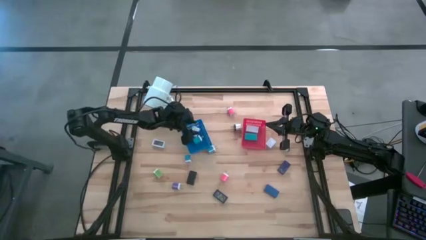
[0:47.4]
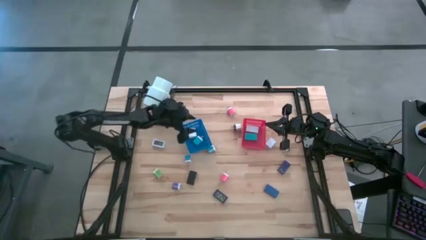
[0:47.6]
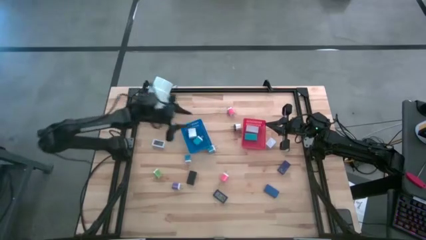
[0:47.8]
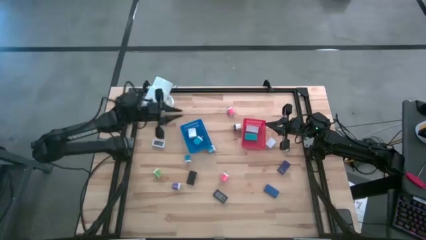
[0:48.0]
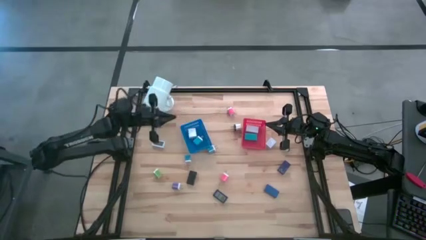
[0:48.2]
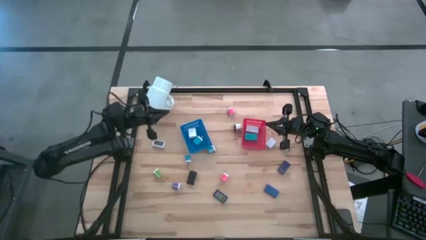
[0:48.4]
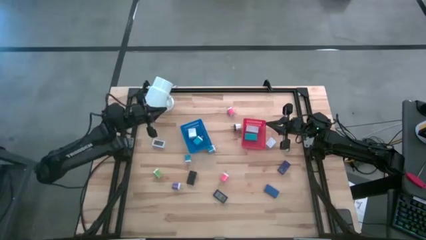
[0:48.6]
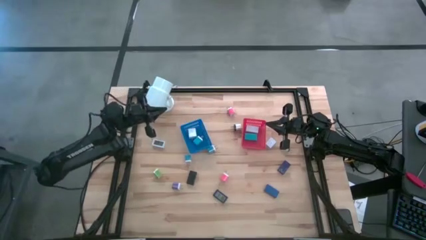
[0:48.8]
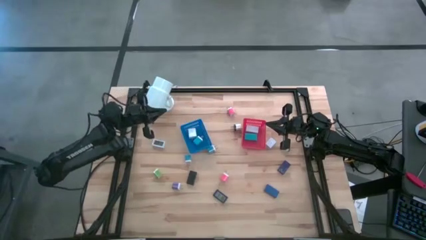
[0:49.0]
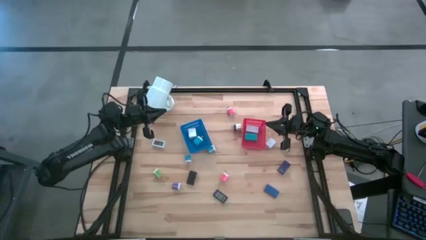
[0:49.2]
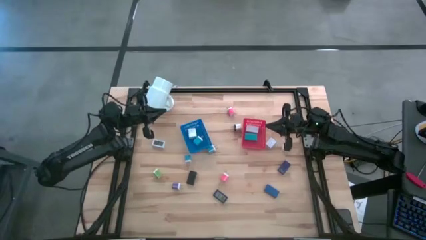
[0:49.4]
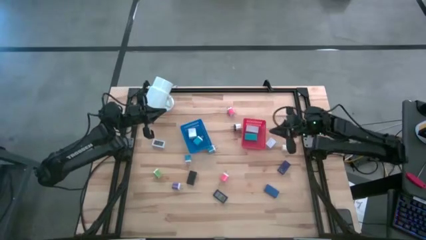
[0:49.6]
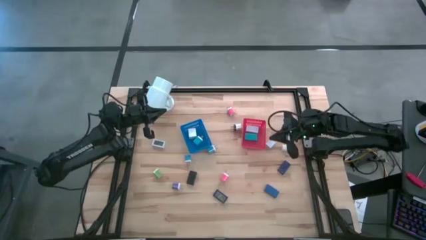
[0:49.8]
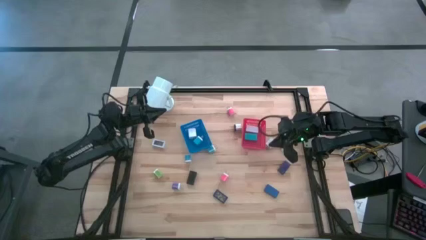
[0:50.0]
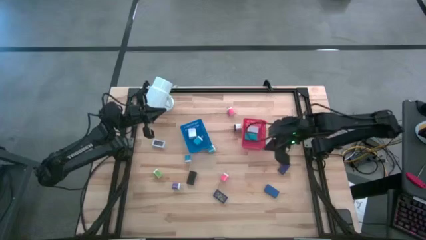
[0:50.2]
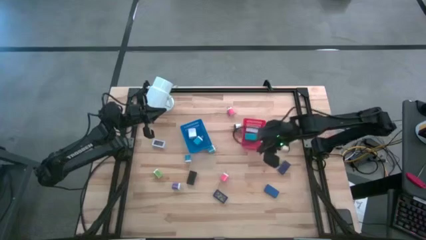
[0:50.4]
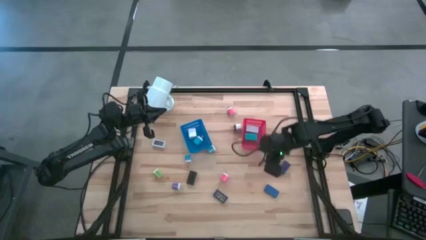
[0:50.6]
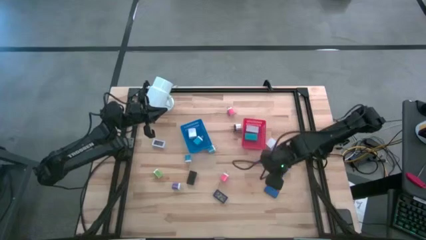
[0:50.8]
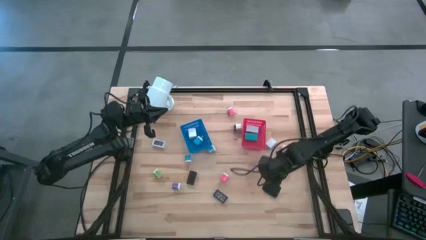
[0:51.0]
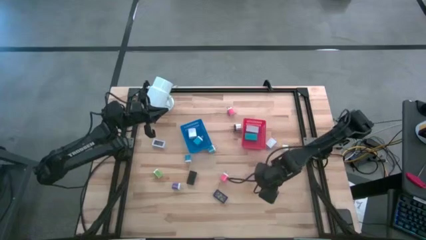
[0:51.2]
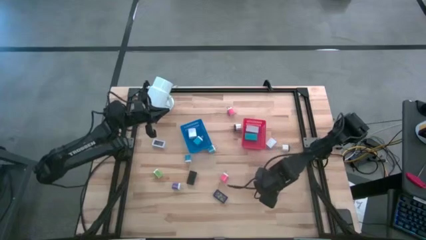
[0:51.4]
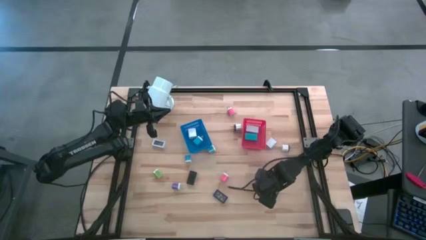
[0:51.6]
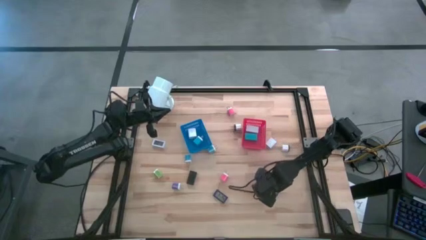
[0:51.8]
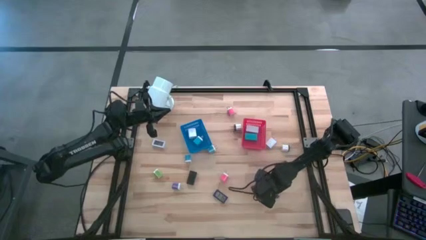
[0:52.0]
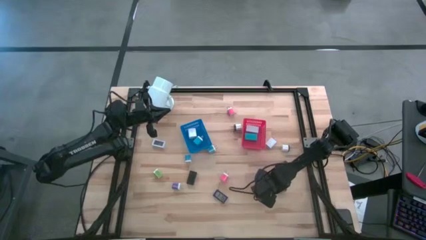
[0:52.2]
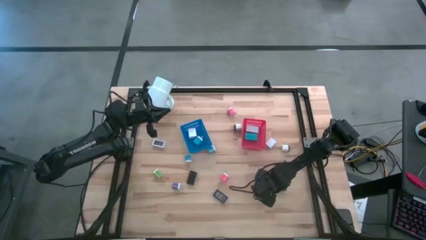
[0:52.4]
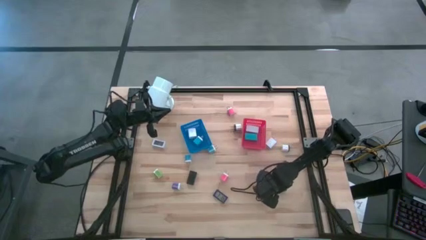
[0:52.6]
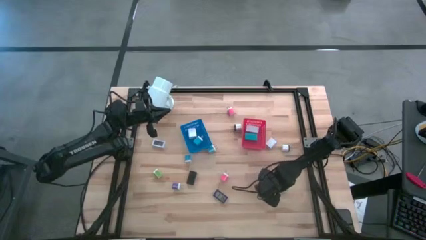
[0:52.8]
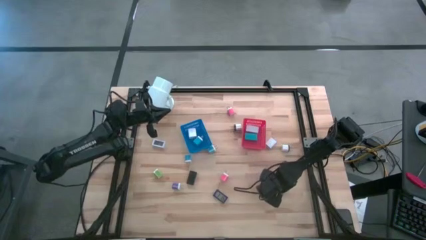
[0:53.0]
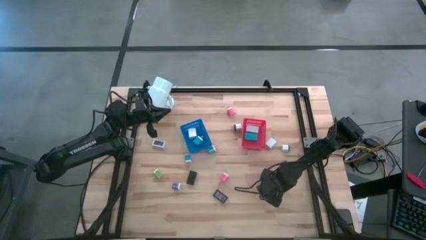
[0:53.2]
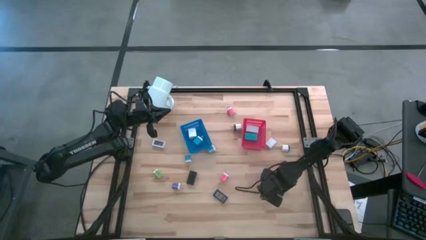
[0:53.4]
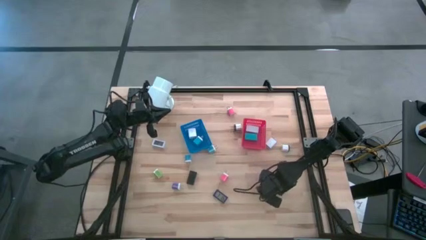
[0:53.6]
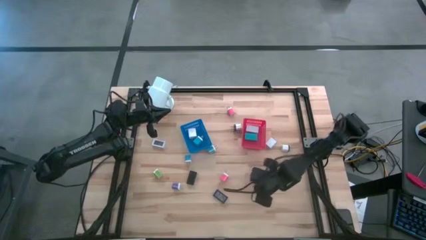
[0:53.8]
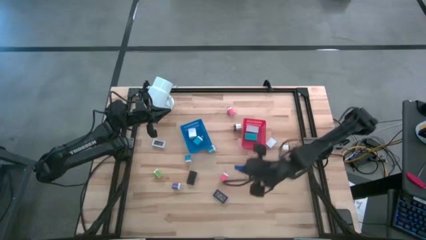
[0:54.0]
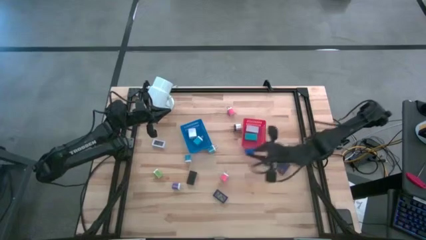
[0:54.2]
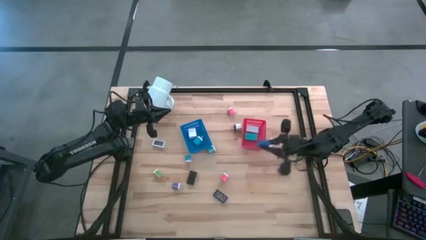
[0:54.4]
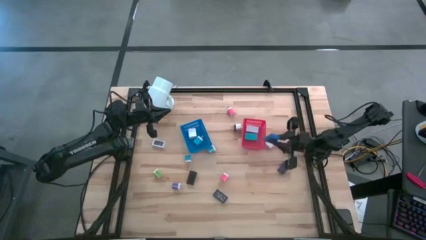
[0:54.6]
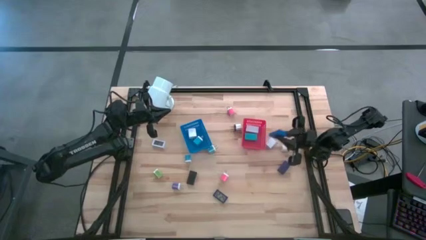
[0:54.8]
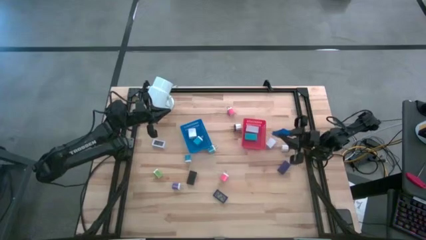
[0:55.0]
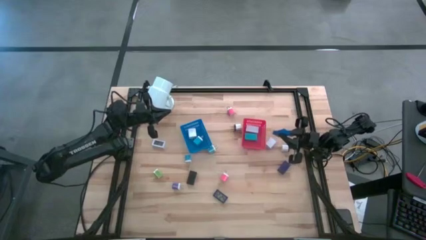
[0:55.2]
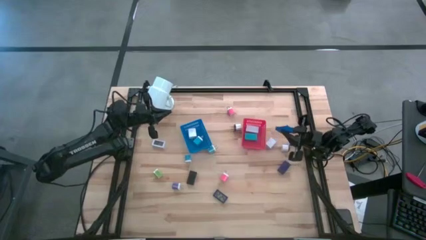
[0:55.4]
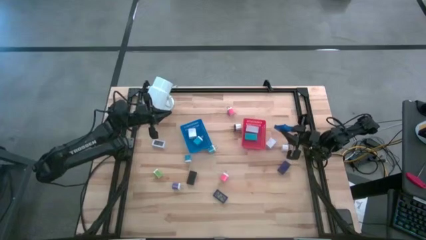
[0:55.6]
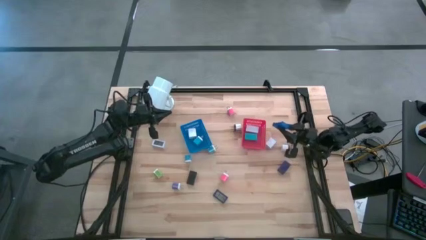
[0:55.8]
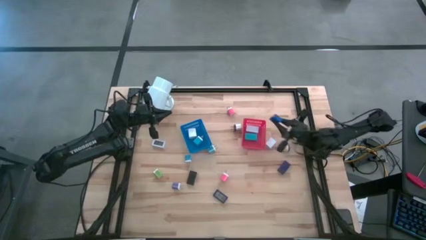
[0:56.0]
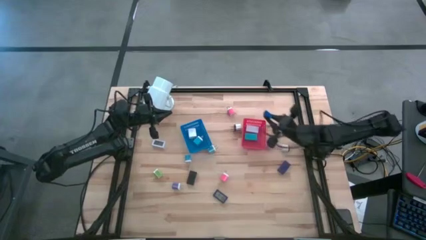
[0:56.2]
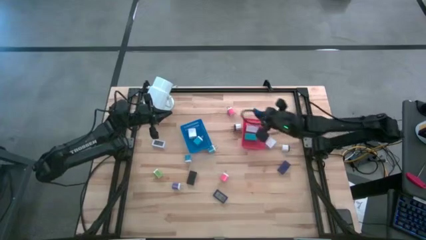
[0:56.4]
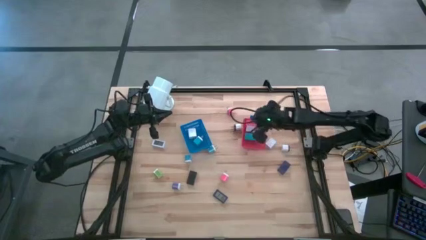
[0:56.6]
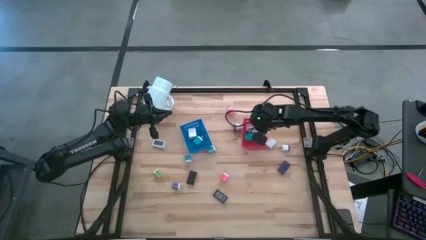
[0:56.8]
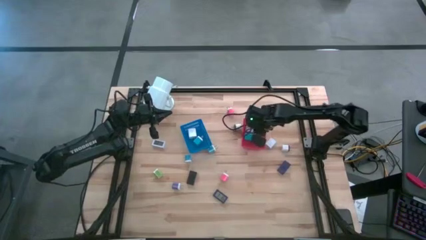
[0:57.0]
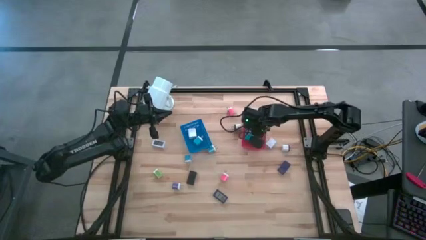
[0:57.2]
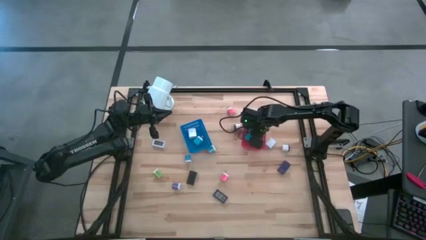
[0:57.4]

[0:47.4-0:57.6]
Task: Pick & Place Office items
Put the blue digital clock into the red bin
